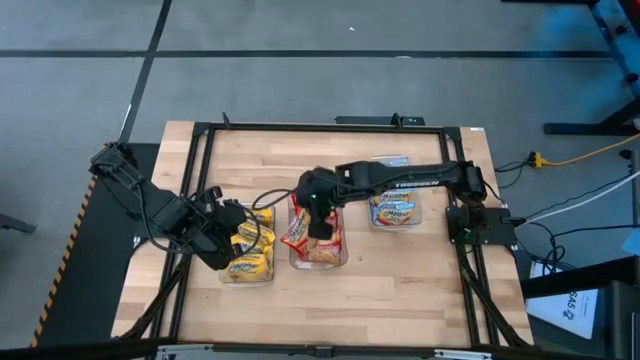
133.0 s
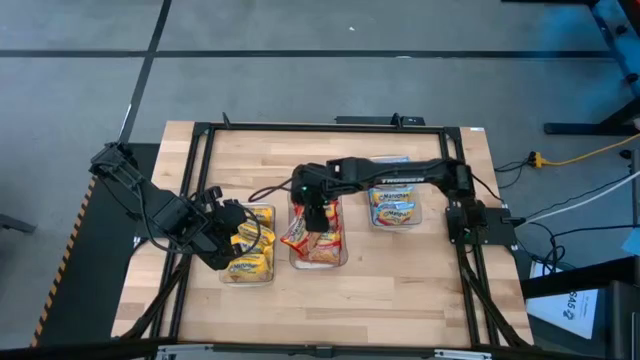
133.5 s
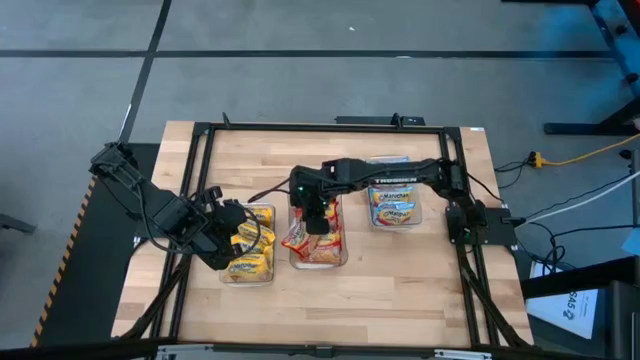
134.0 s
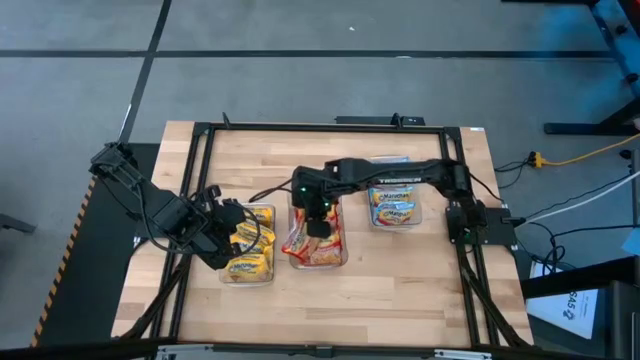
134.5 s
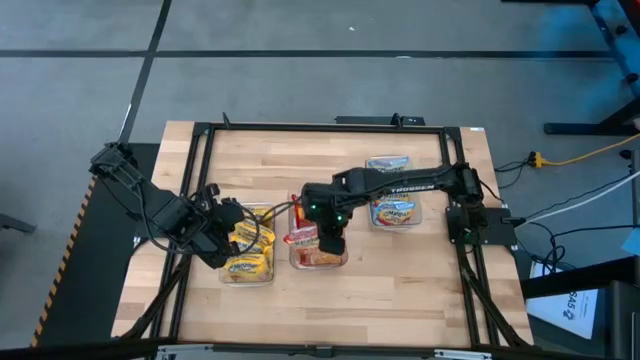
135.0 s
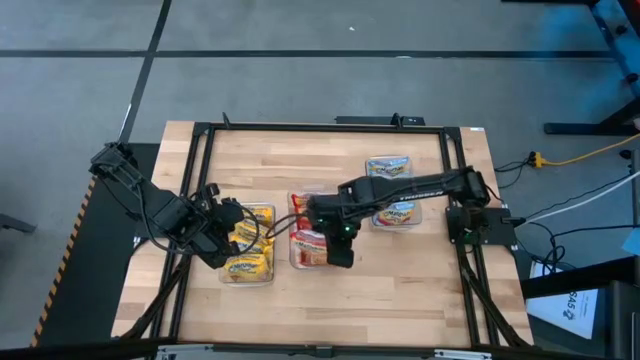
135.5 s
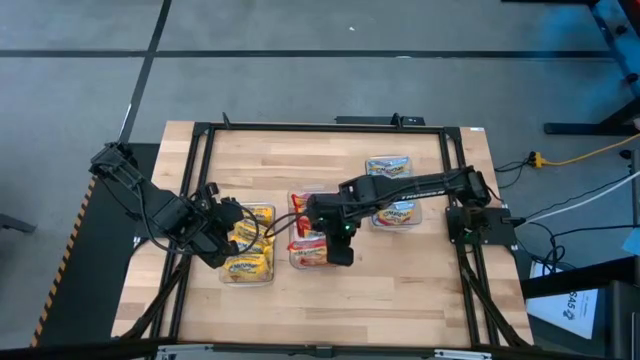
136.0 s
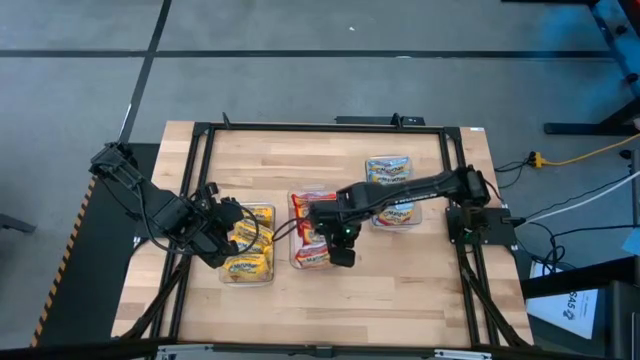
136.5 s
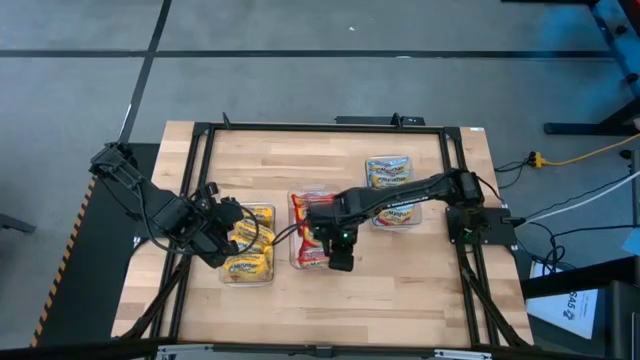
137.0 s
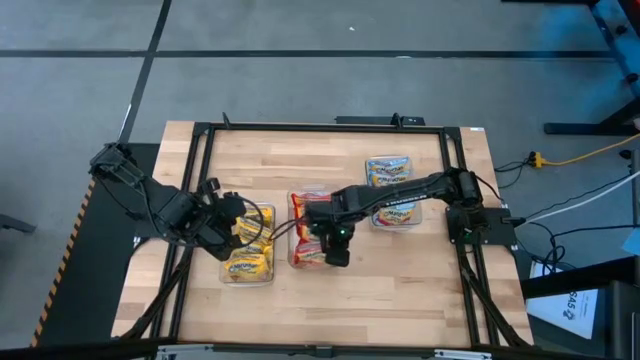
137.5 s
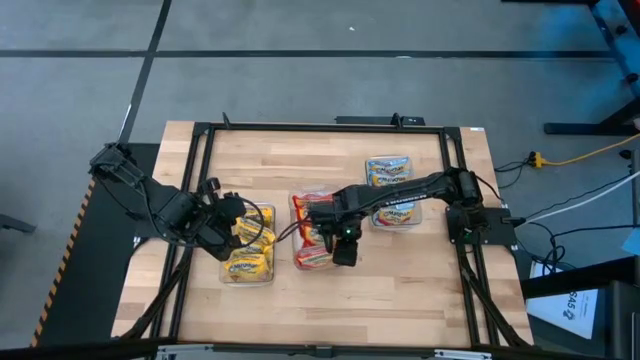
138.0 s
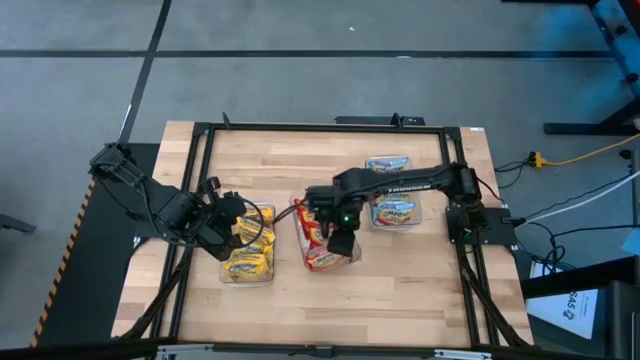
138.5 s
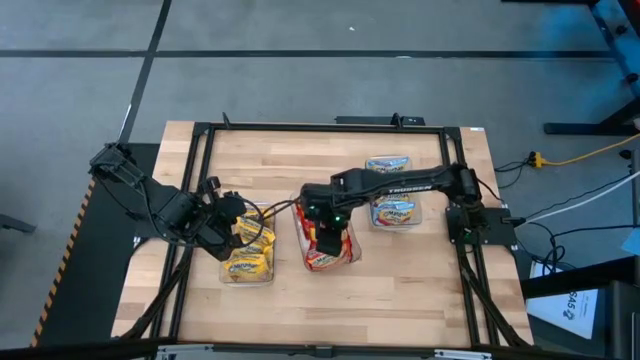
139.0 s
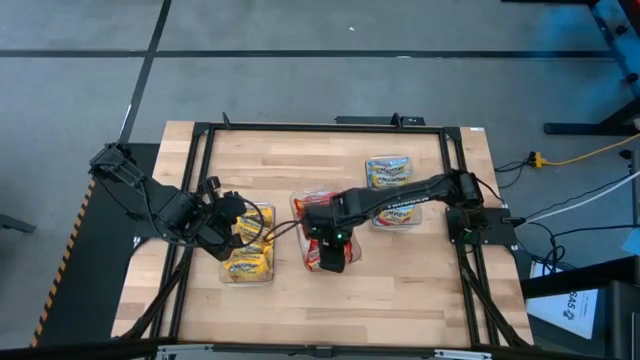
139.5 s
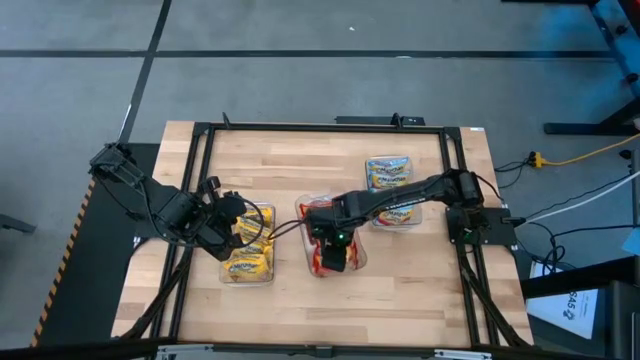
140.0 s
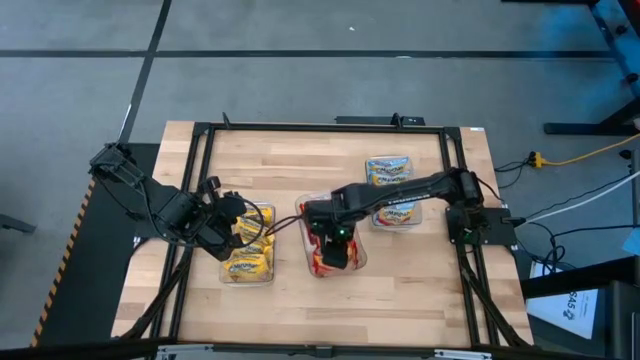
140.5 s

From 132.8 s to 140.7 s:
Task: Sort Maruchan noodles
Put the red noodle pack into the middle transparent bin

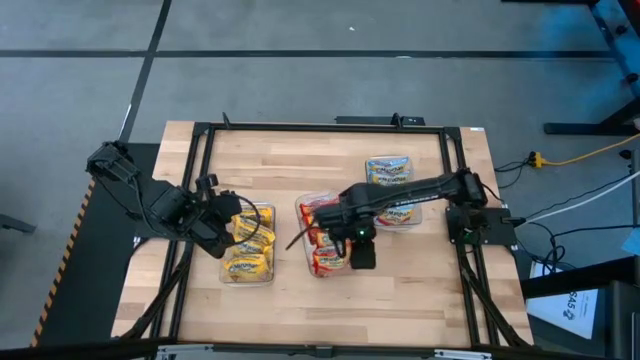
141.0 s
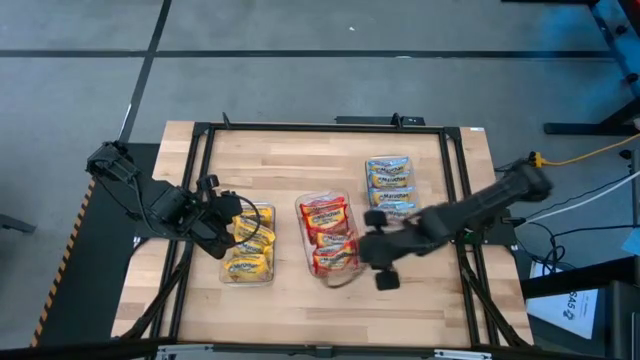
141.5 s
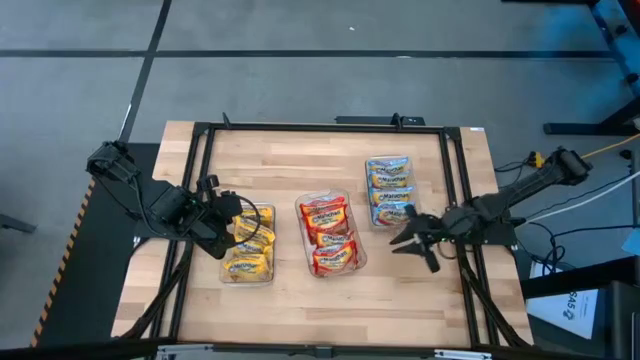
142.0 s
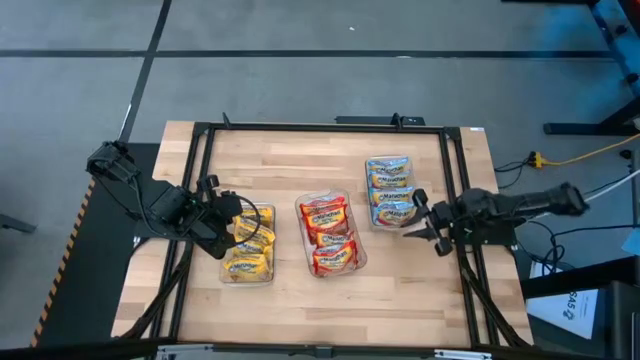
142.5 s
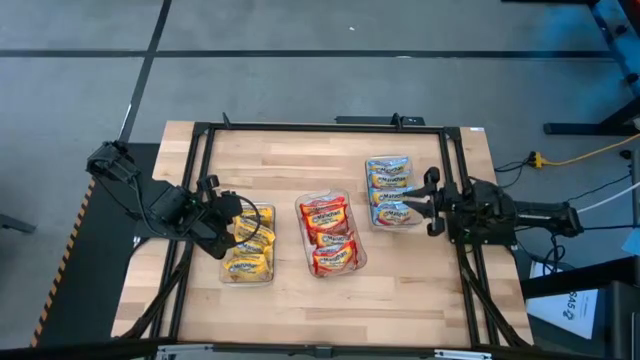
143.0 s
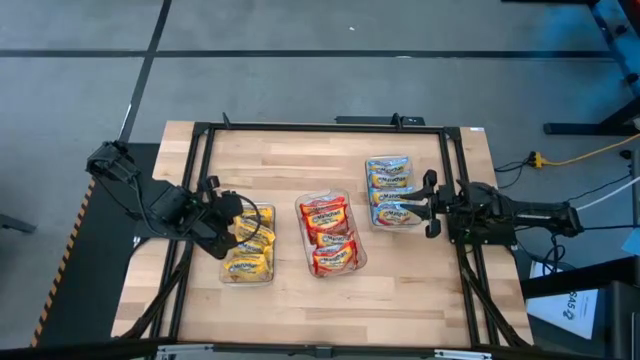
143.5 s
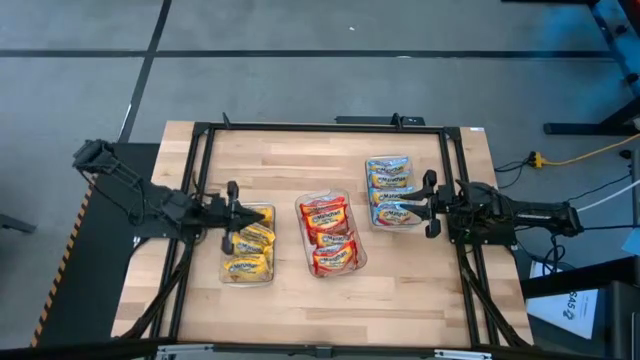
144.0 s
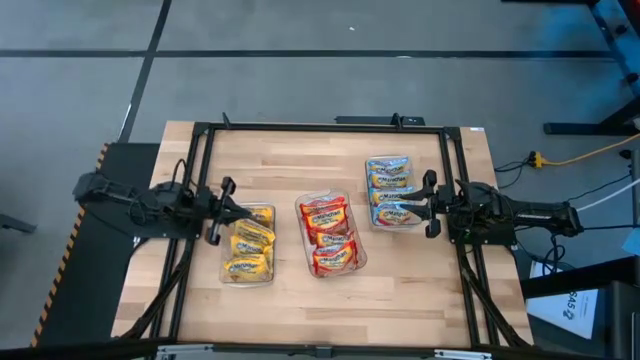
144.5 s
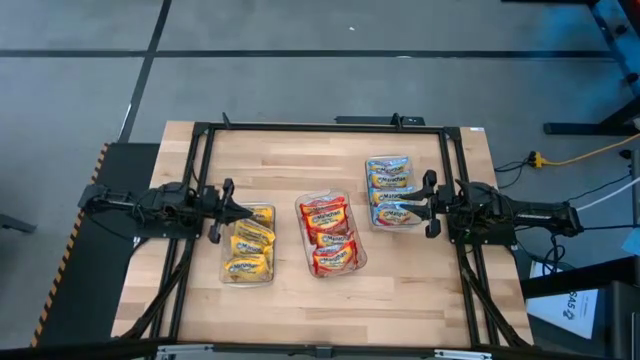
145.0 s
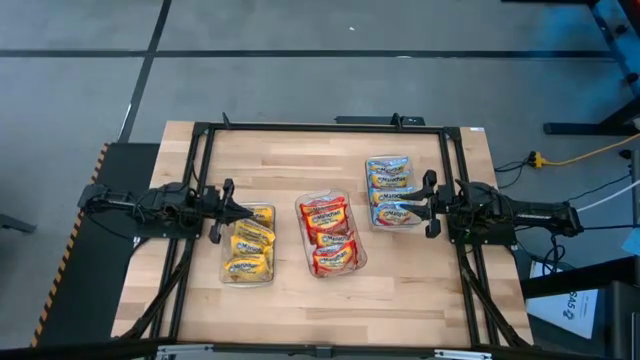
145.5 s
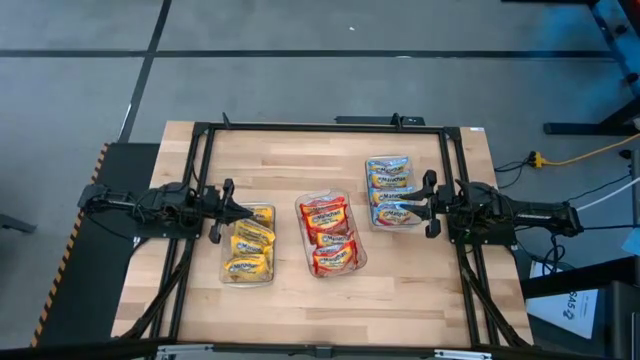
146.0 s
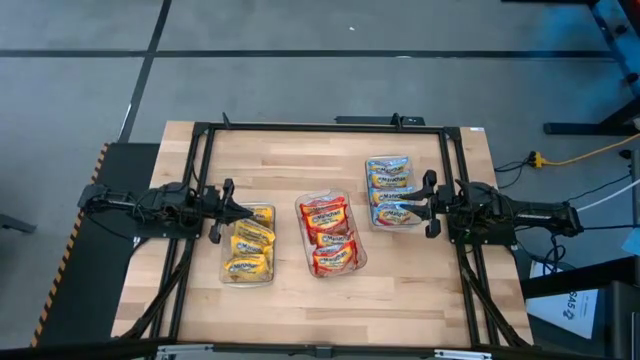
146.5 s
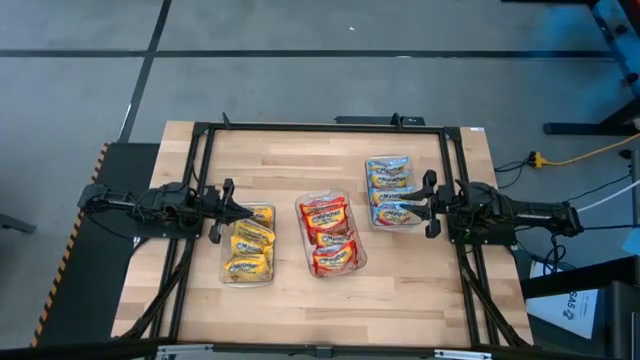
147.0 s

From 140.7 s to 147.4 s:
Return to Home Position

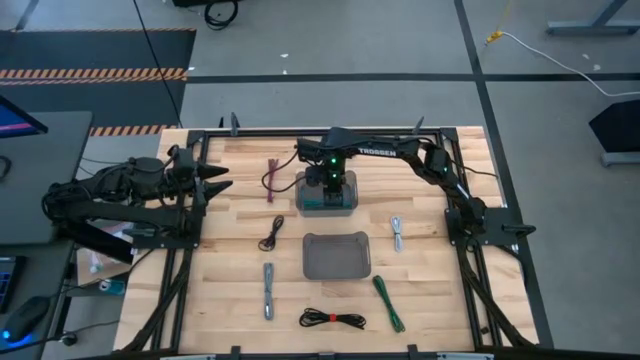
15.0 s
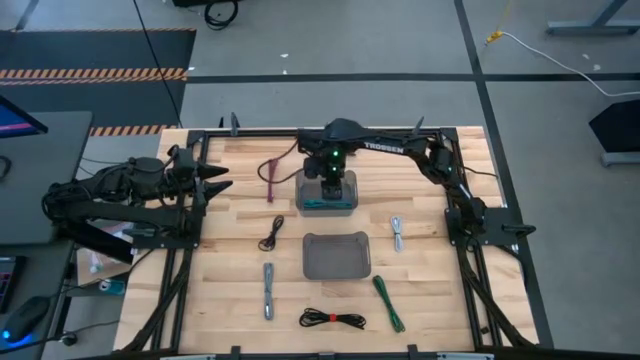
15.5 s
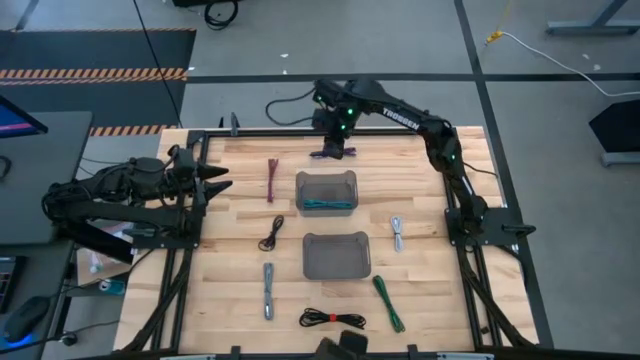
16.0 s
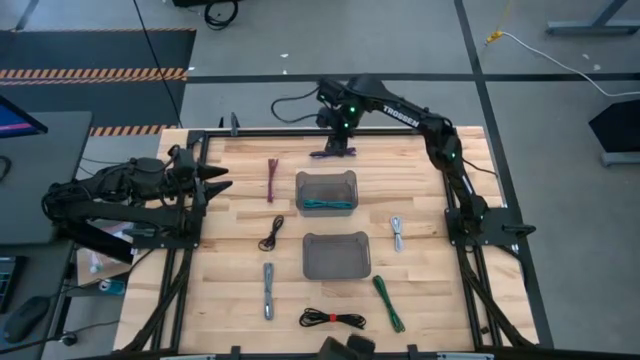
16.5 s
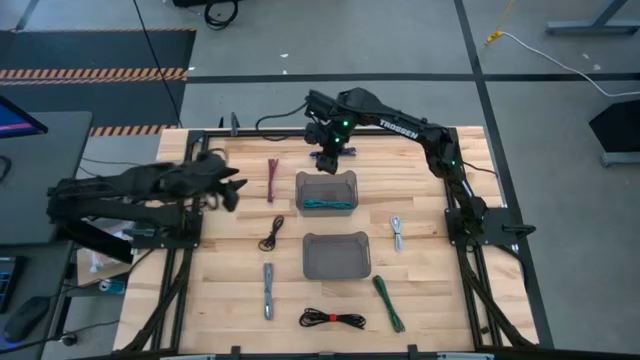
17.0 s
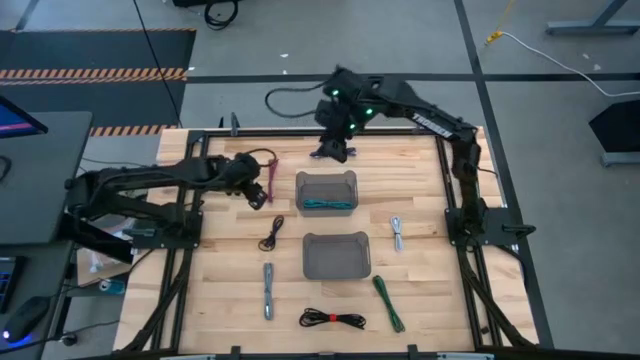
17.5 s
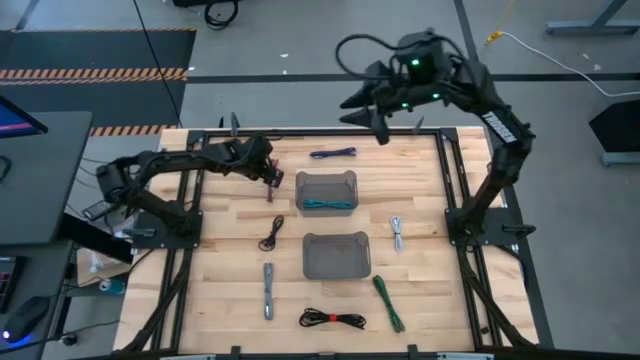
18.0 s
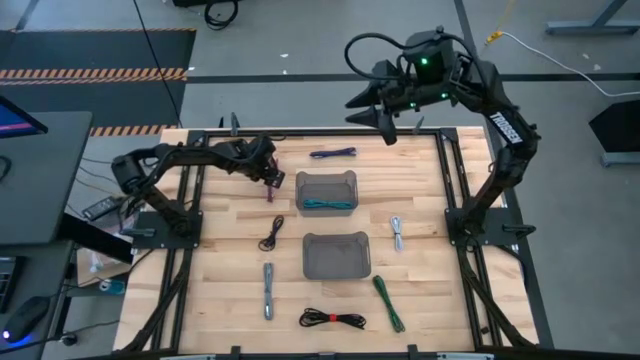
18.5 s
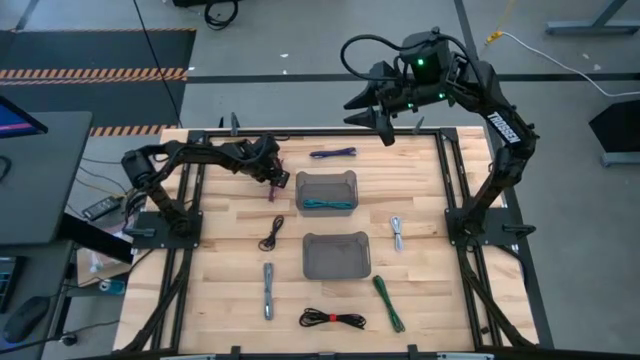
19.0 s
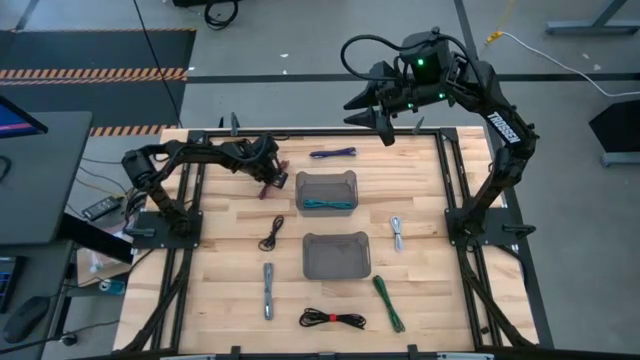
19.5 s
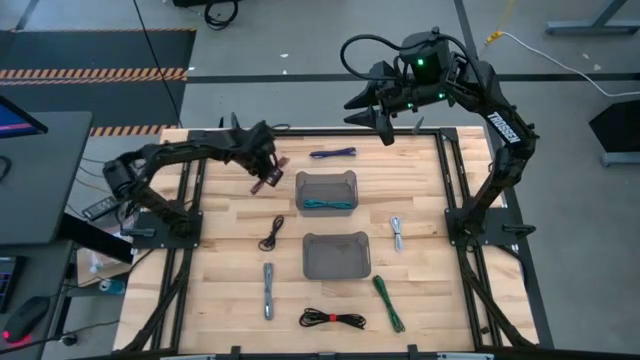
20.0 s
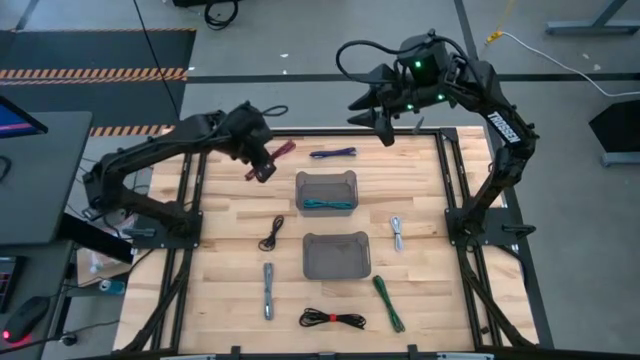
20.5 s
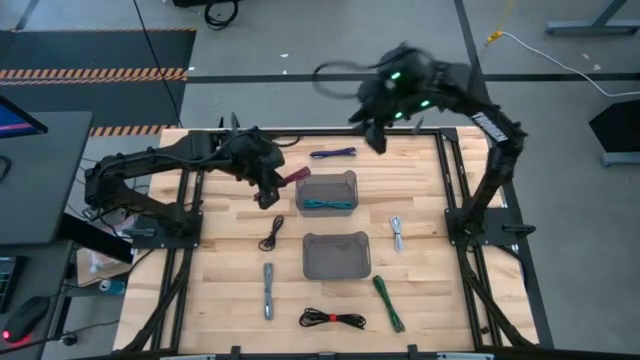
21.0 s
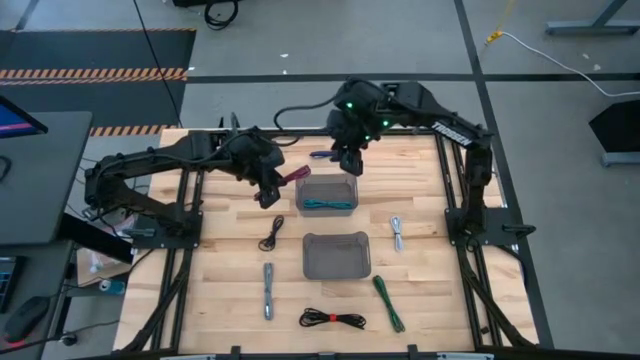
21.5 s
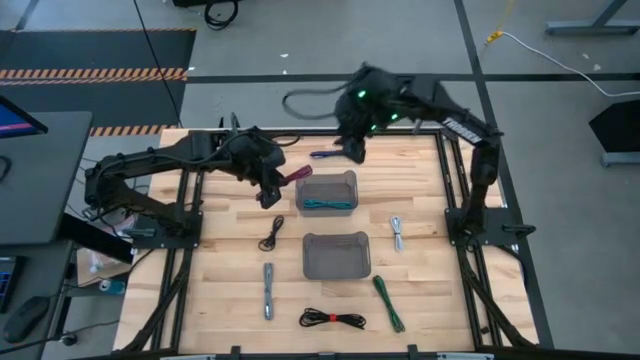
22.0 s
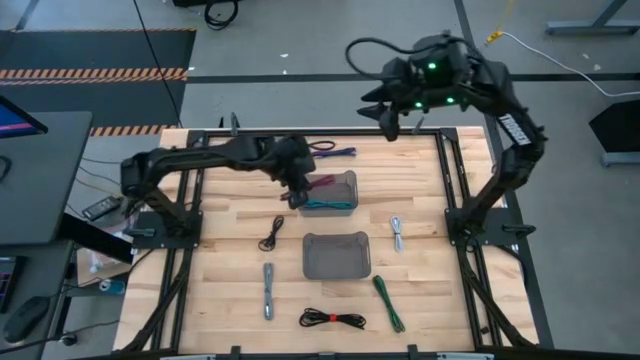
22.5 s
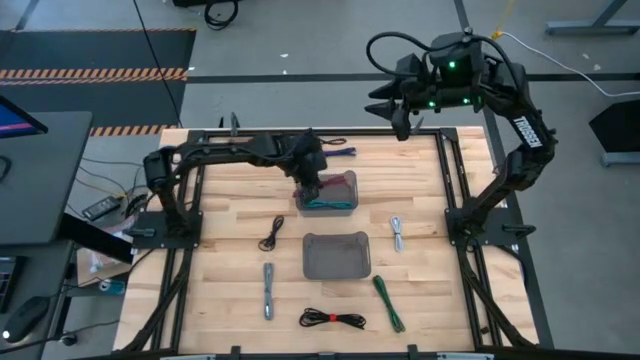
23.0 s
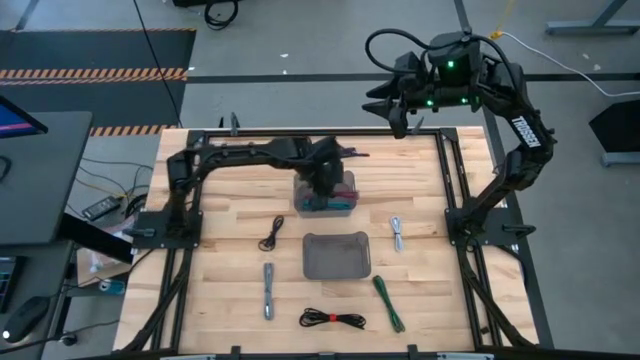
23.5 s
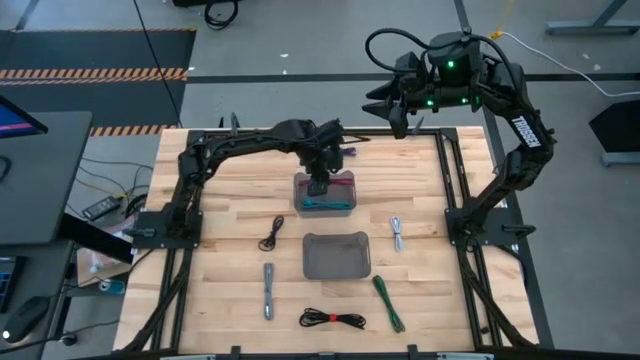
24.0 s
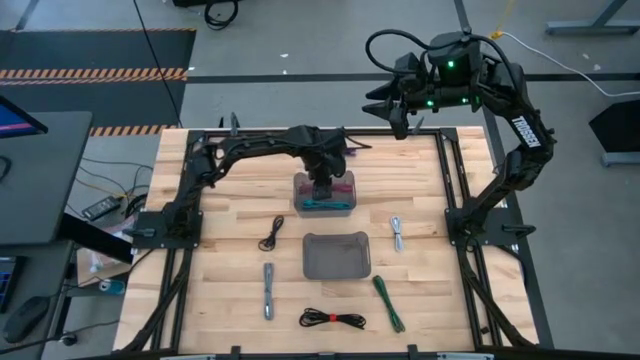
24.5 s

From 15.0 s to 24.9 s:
Task: Pick and place USB-C Cables
Put the pink charger cable into the top black transparent bin
